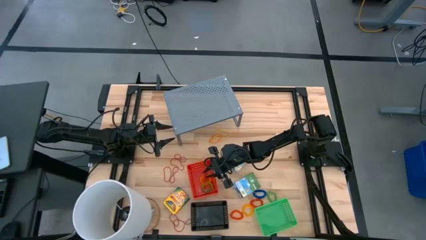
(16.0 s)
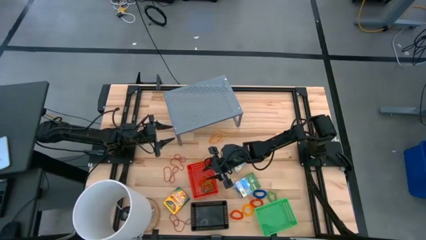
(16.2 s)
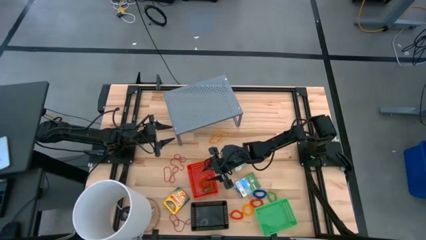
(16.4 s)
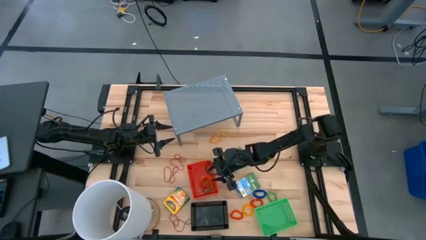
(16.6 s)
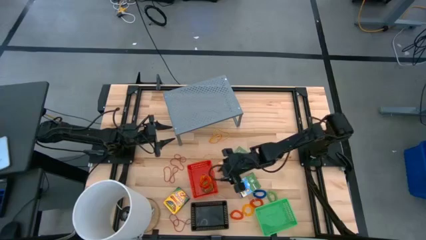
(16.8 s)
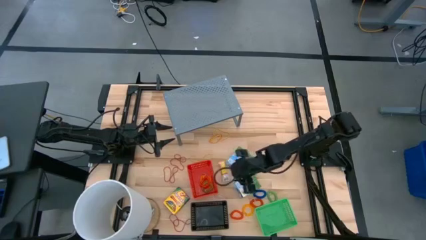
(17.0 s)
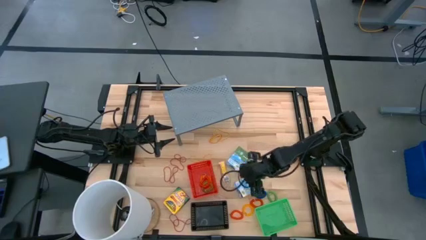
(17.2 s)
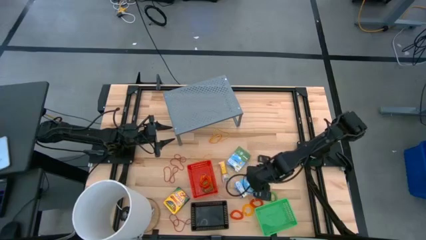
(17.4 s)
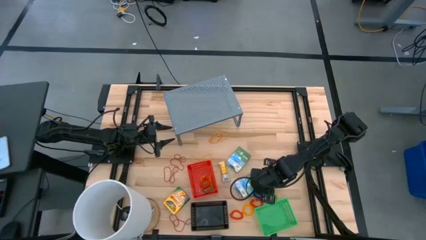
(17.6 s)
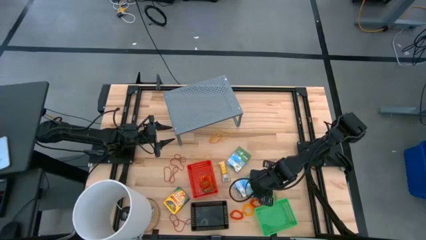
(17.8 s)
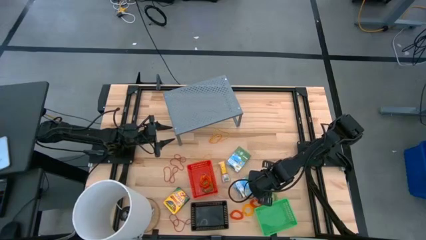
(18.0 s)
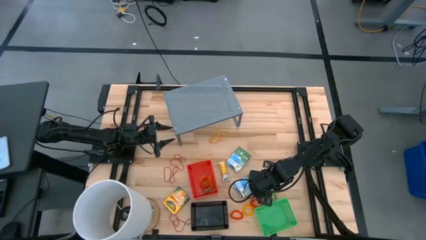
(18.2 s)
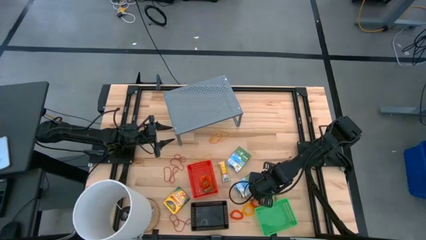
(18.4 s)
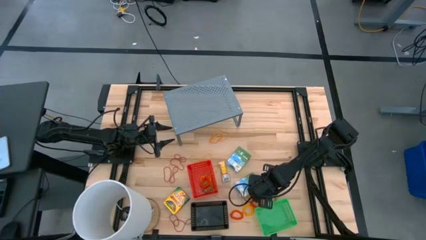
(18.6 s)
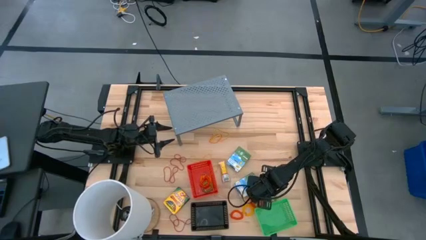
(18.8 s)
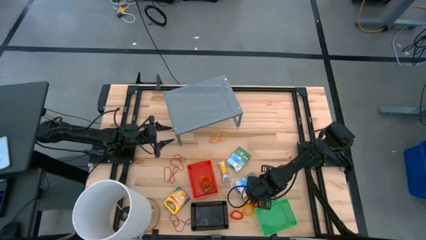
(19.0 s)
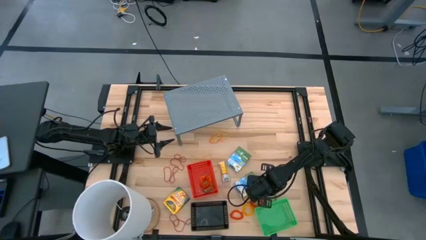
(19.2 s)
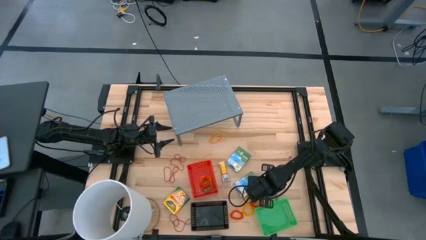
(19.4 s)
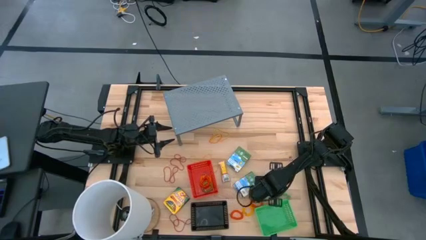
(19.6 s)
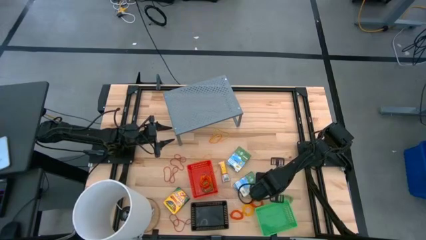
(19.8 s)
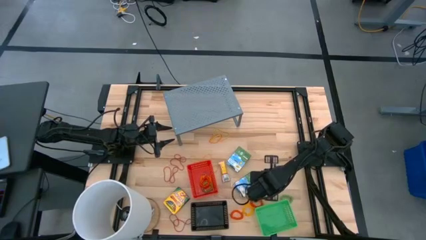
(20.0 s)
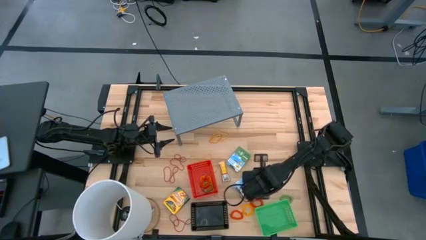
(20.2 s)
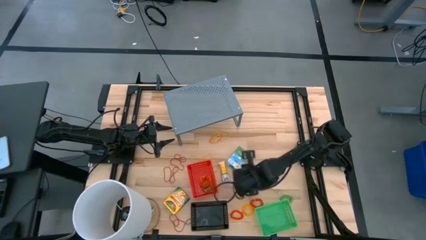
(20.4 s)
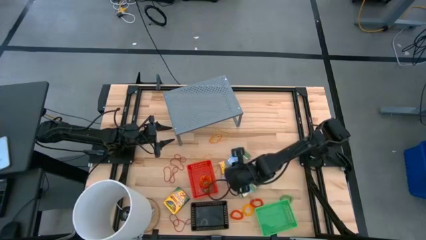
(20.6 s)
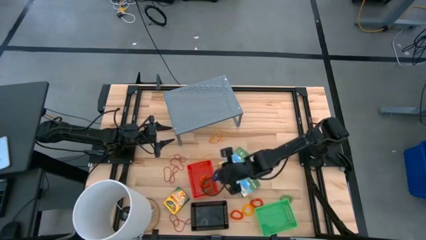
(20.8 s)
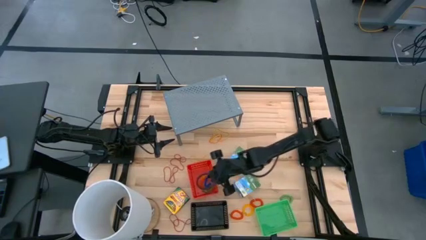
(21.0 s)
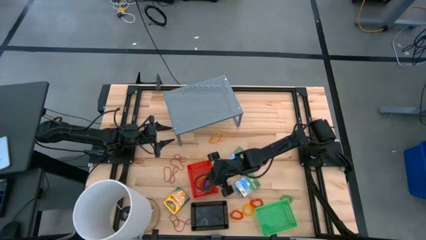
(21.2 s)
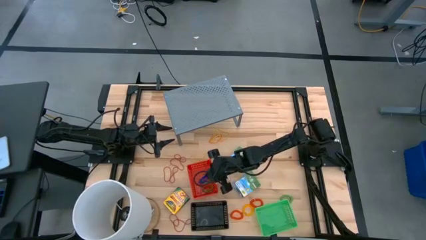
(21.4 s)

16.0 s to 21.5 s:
Task: Pick & Place Office Desk Supplies
Put the blue spring keychain into the red bin

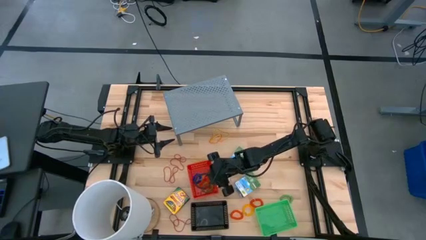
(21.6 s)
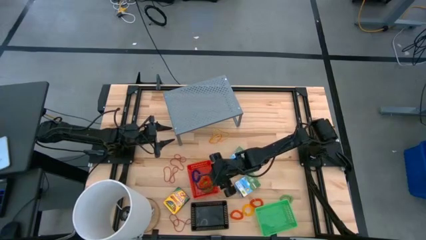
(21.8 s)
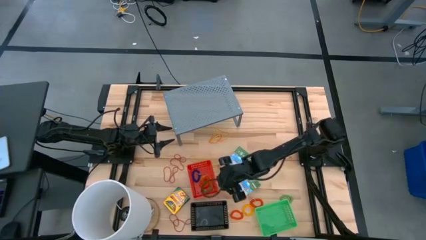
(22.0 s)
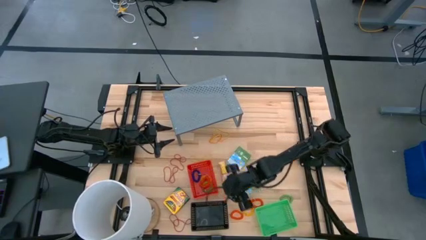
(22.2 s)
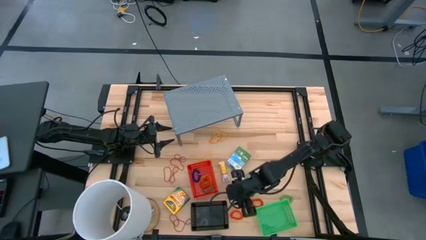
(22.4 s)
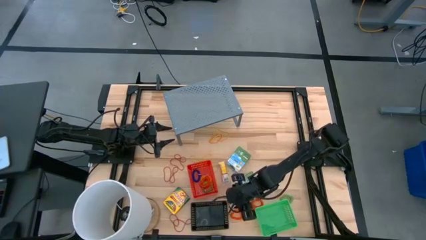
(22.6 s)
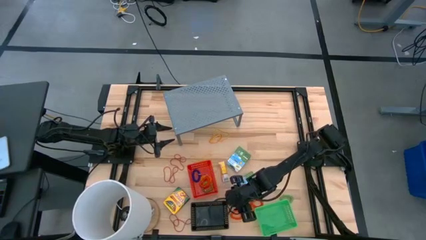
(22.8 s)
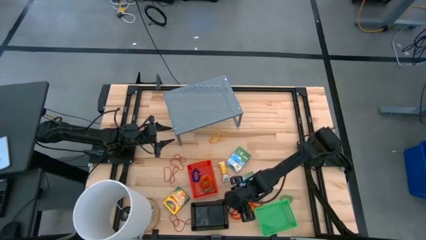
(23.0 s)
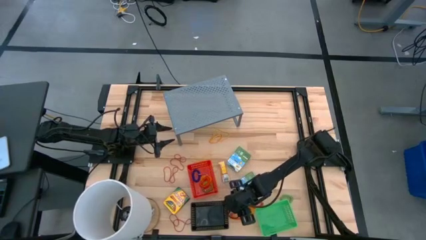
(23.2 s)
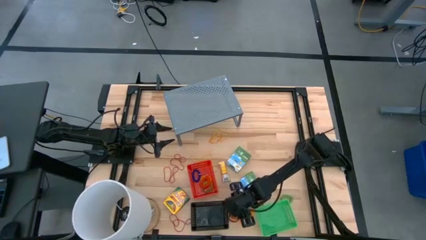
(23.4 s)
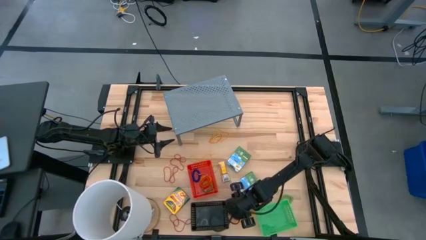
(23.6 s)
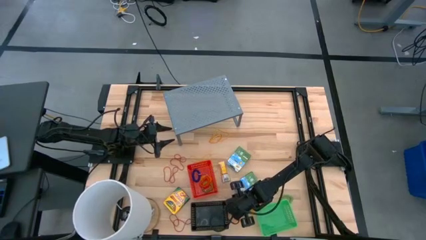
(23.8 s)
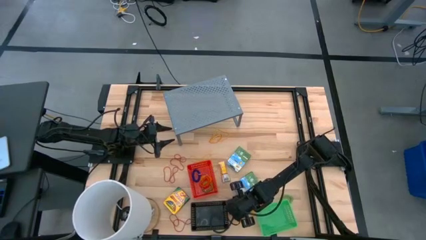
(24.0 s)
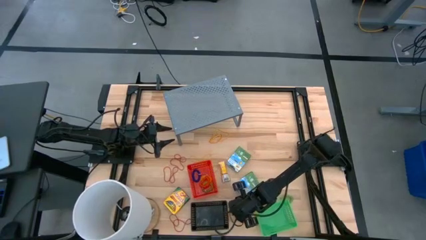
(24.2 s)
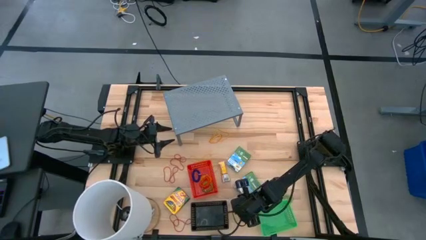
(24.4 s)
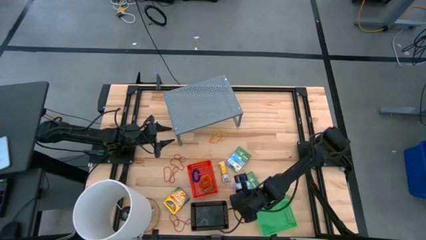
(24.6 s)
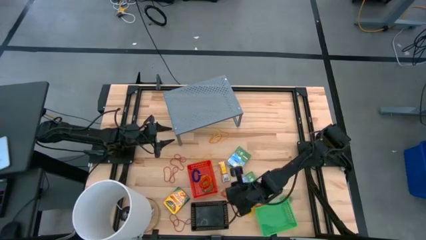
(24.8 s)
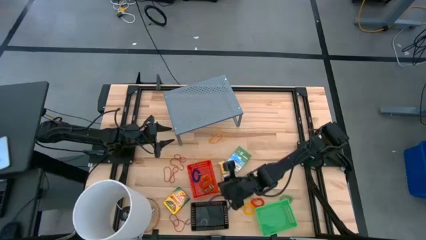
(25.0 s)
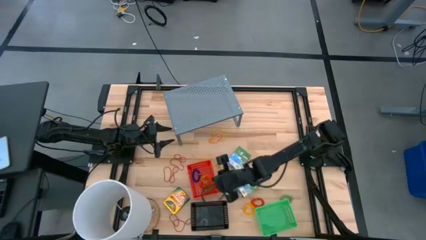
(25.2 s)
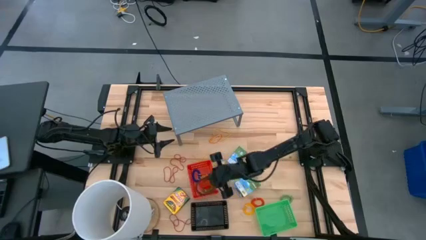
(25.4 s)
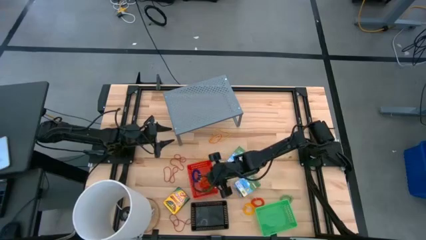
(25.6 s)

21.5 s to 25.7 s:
Put the left orange spring keychain into the red bin

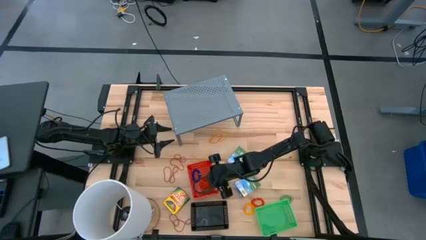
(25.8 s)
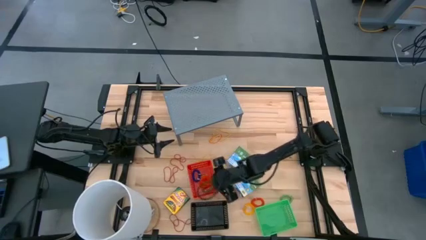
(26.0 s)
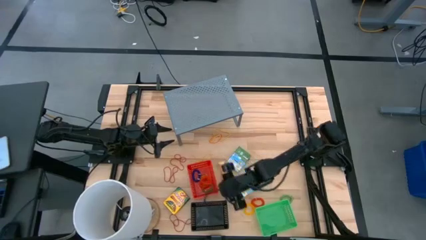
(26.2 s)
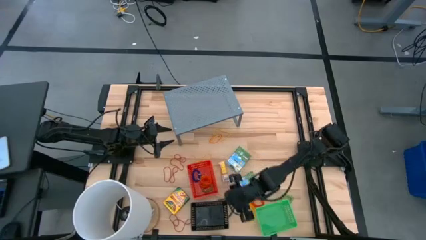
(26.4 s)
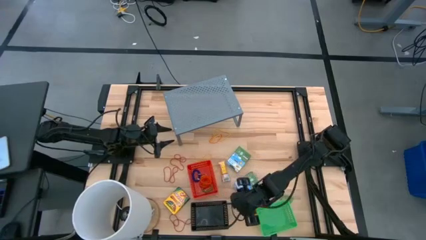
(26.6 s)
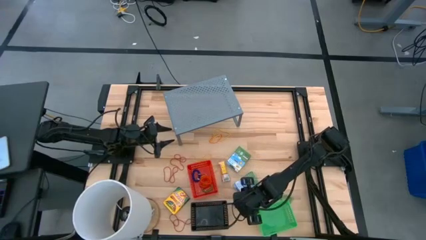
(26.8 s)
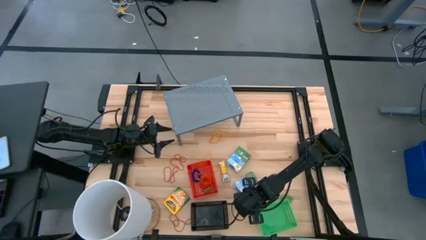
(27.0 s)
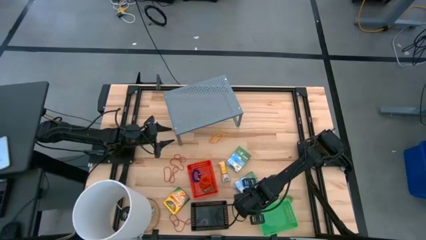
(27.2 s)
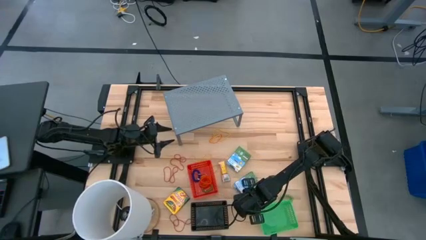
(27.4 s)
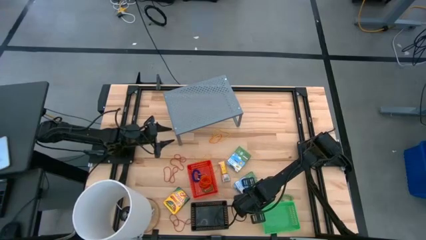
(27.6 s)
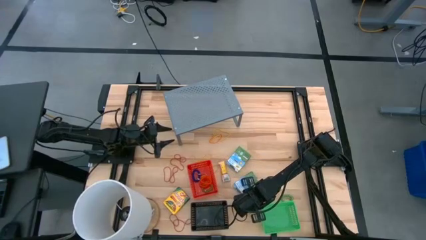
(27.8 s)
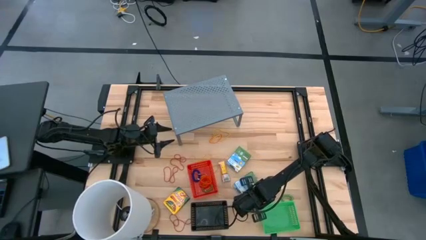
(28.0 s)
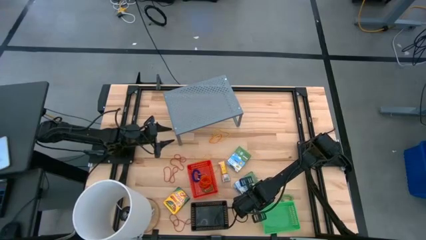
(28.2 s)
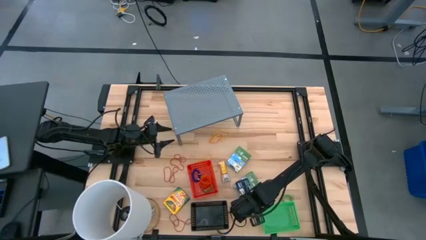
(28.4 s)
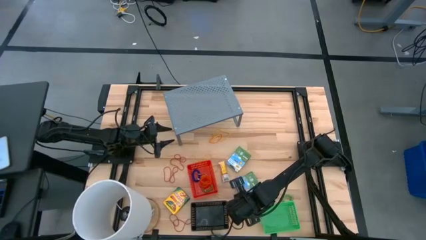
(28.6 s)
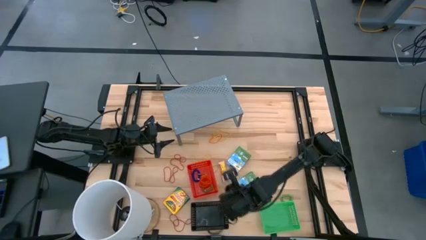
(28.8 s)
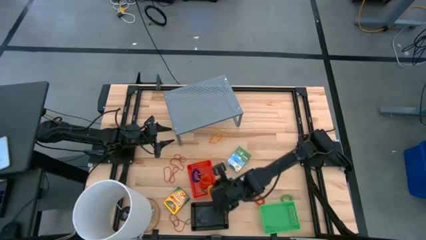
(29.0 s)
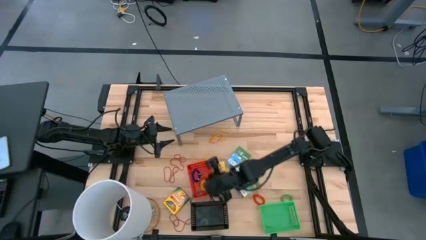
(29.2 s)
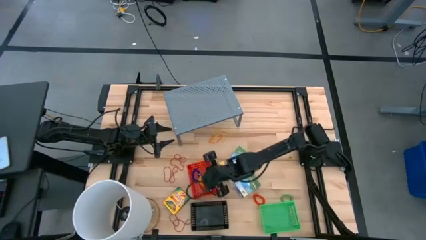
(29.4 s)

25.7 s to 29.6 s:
Put the yellow spring keychain into the red bin

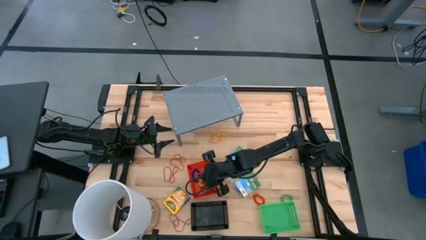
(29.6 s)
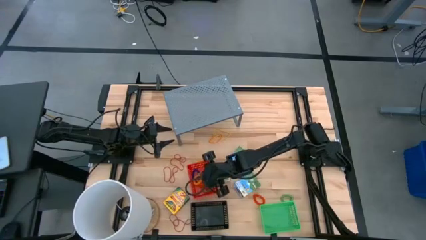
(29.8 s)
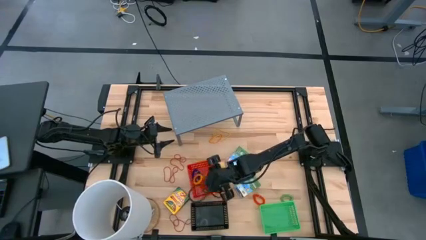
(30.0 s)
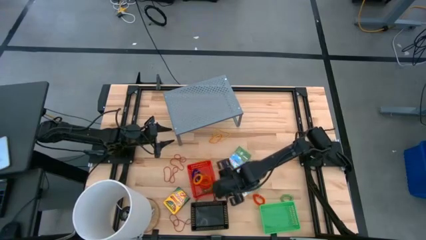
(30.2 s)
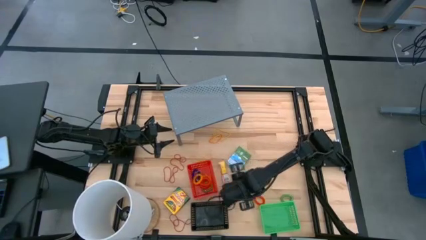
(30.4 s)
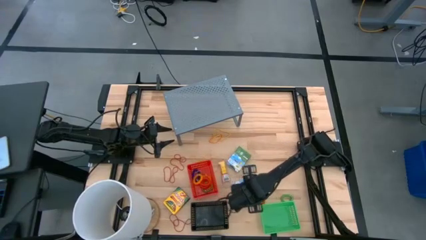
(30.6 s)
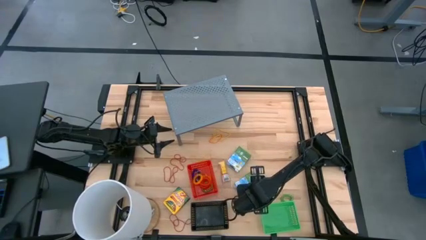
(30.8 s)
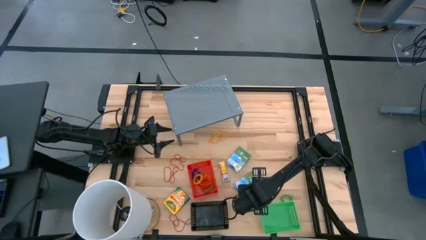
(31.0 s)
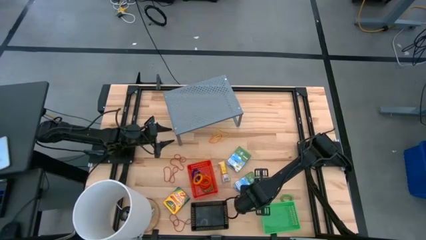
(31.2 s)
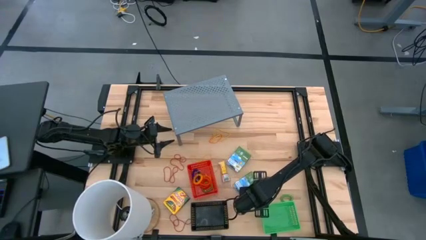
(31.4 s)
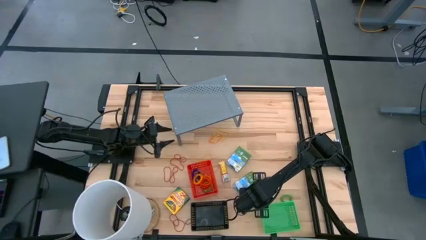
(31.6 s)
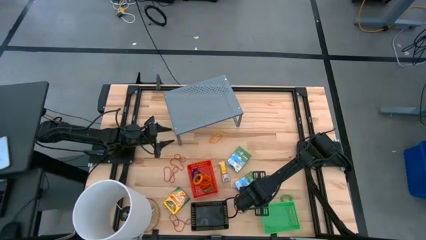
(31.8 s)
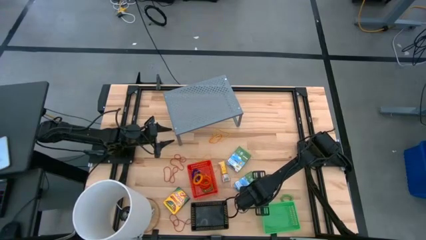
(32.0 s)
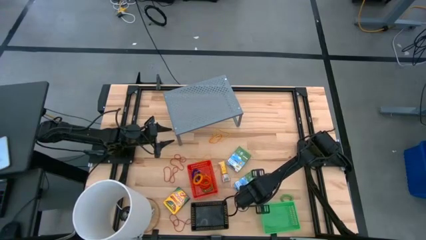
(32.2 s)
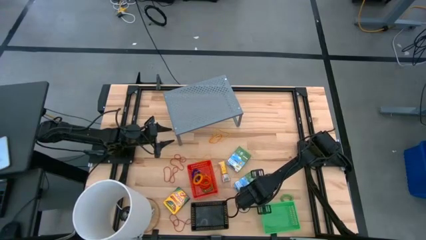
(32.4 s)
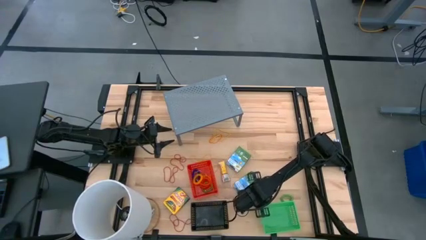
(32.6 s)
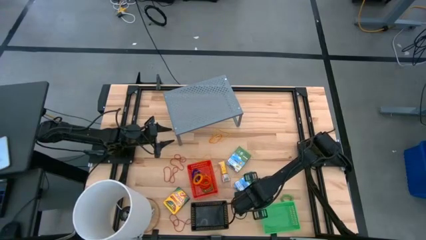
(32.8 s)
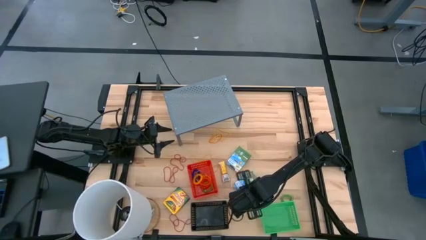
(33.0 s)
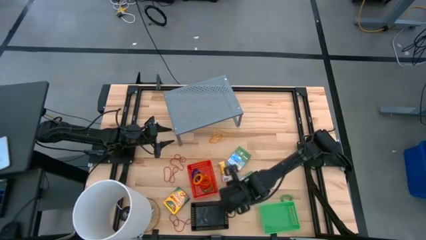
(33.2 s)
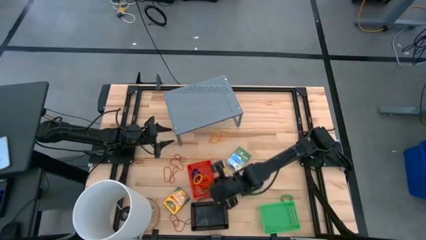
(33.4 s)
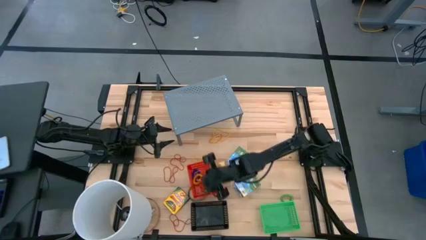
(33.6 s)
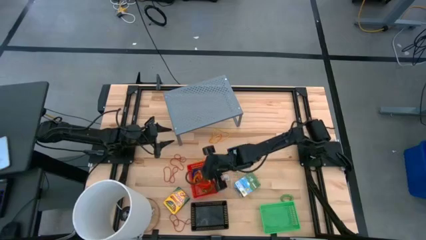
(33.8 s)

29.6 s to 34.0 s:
Put the orange spring keychain into the red bin
